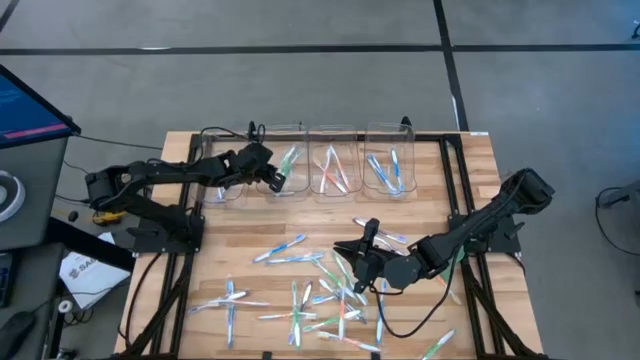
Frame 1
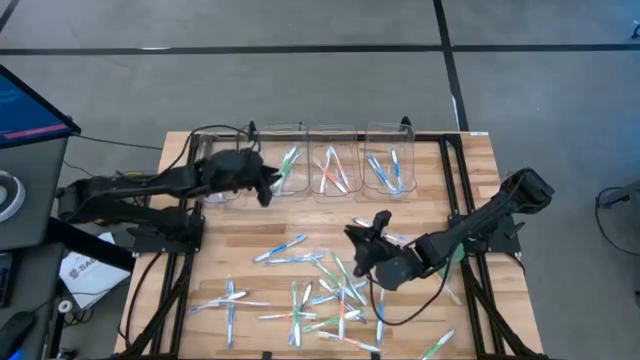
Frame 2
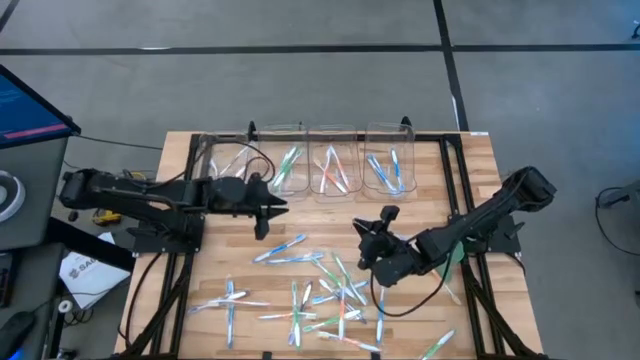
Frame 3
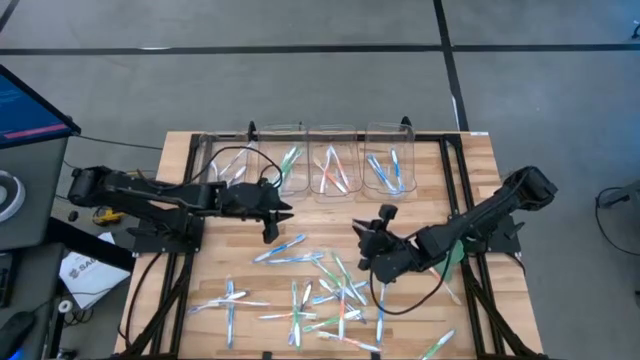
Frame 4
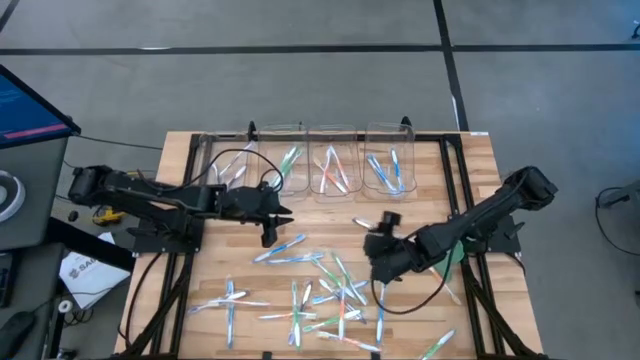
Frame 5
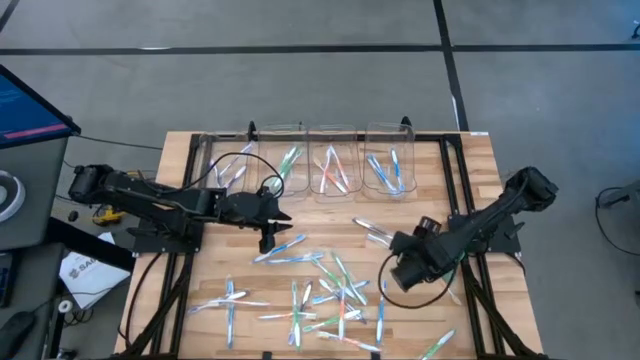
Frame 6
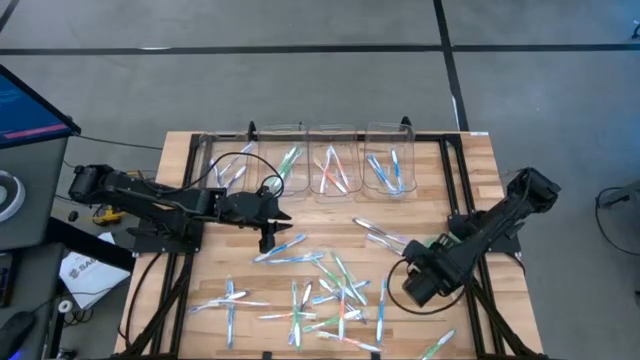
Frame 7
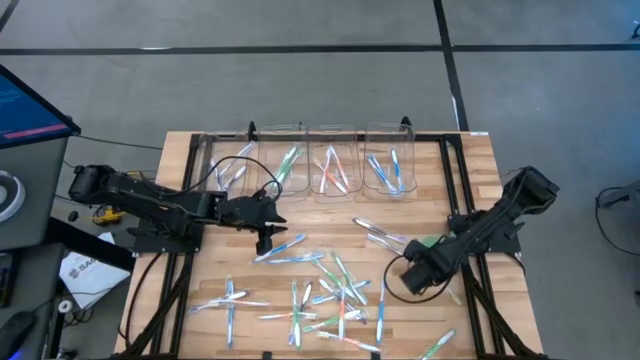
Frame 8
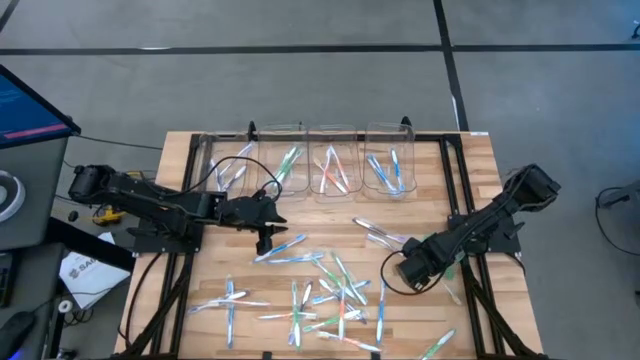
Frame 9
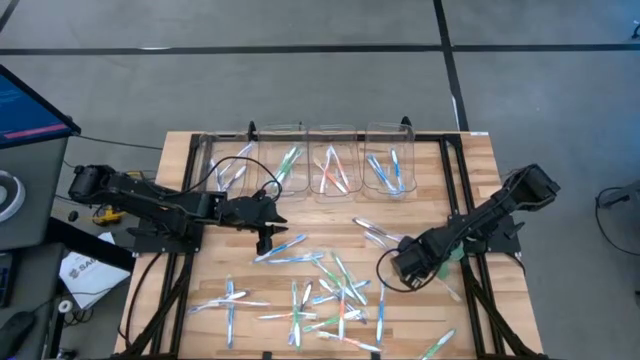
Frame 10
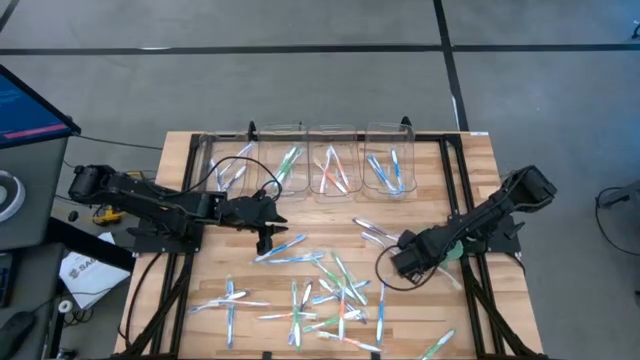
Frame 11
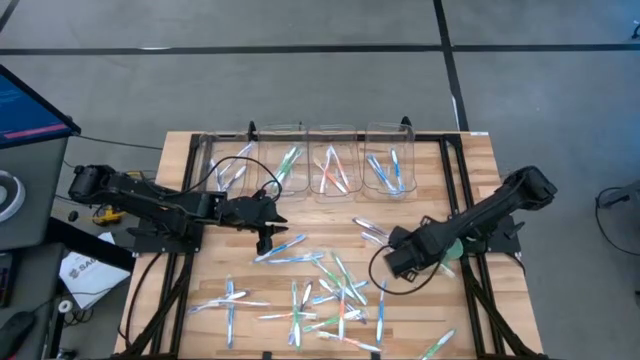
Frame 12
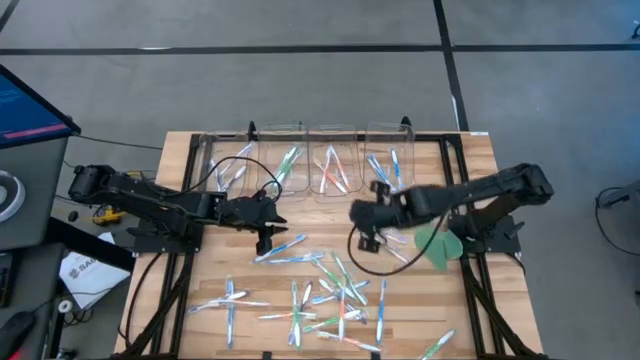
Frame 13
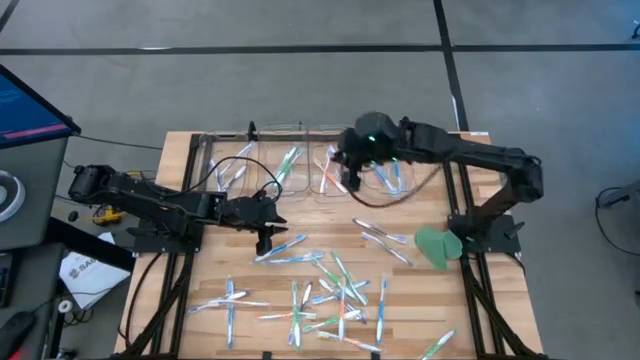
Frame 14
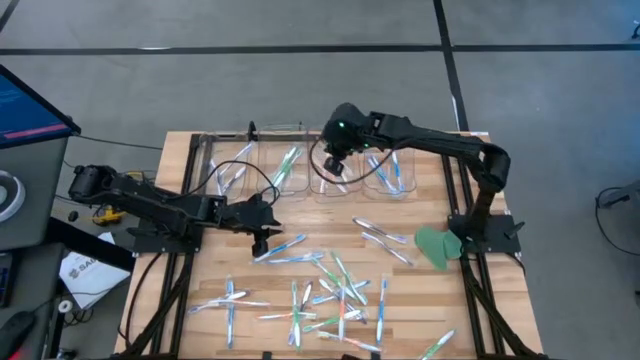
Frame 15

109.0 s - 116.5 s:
Task: Pick & Place Toothbrushes
Put the orange toothbrush into the middle right transparent bin

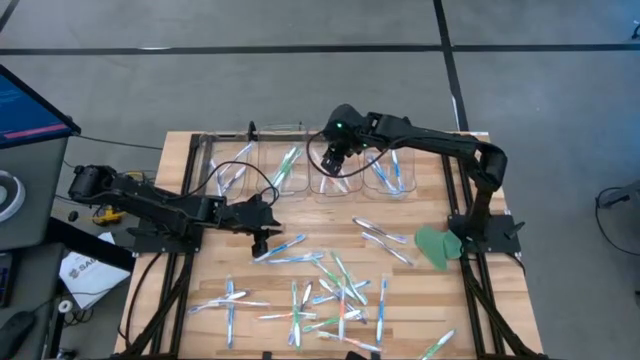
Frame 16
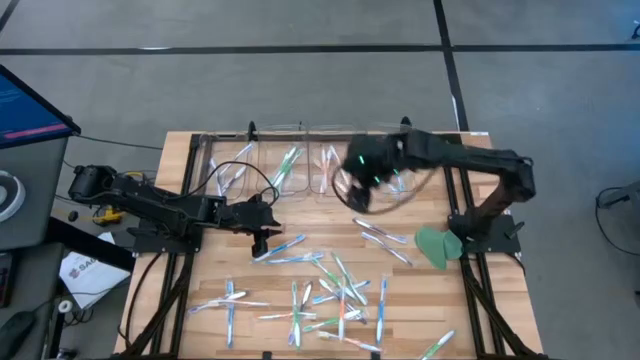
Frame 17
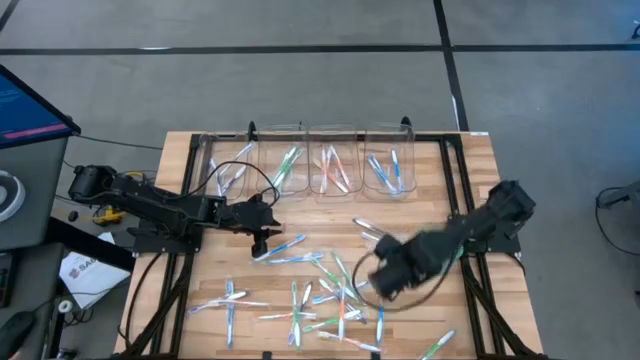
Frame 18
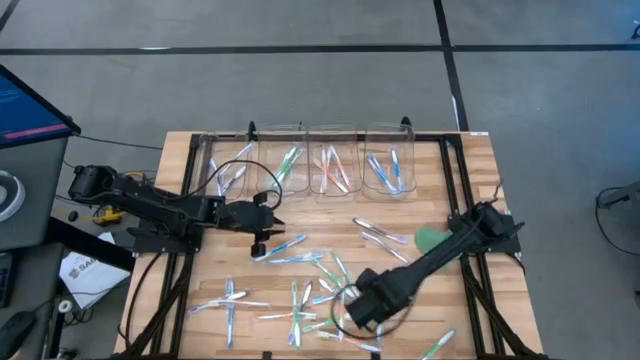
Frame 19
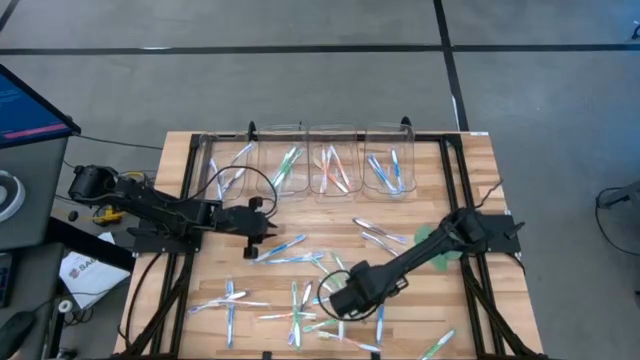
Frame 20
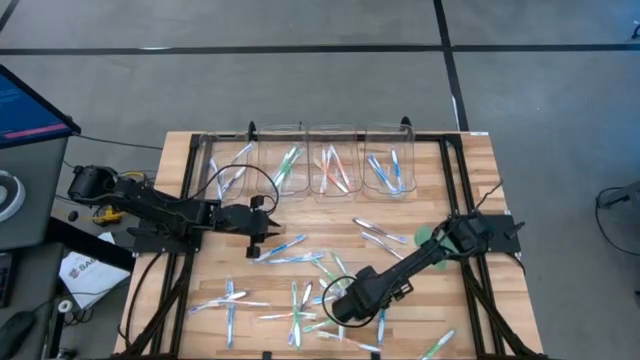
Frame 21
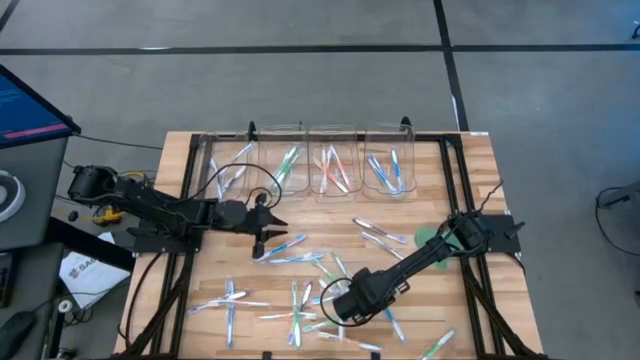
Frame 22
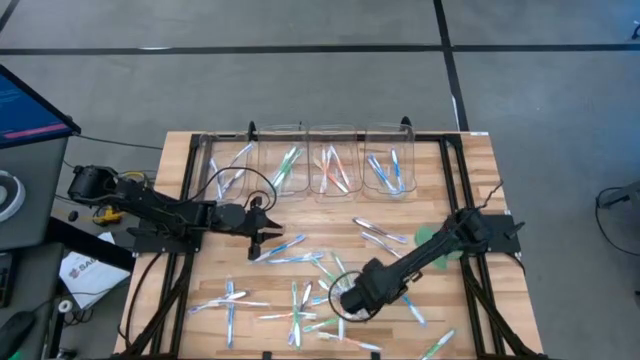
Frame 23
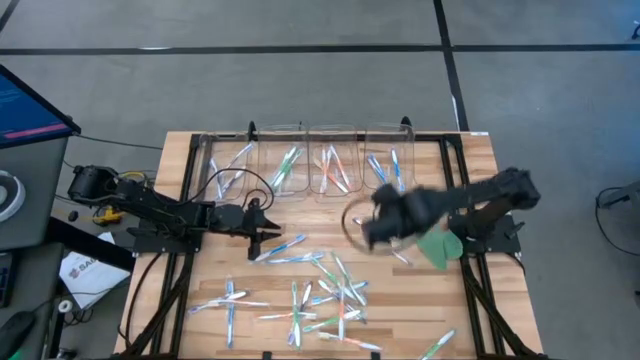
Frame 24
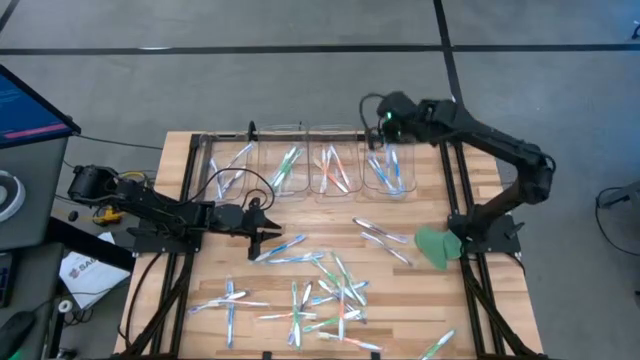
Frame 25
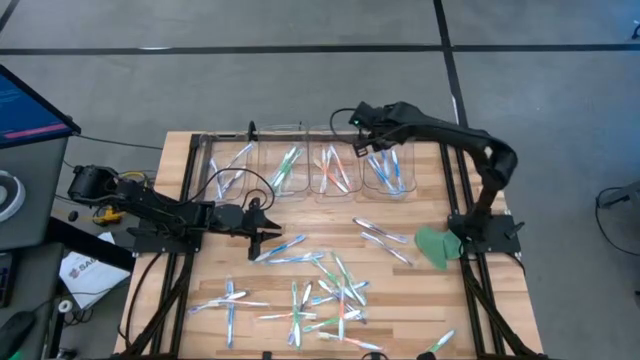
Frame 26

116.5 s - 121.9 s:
Put the blue toothbrush into the right transparent bin

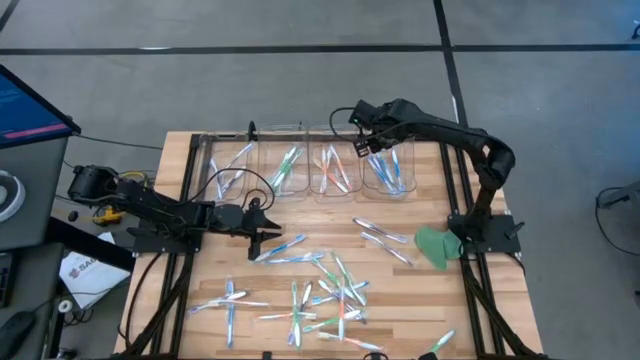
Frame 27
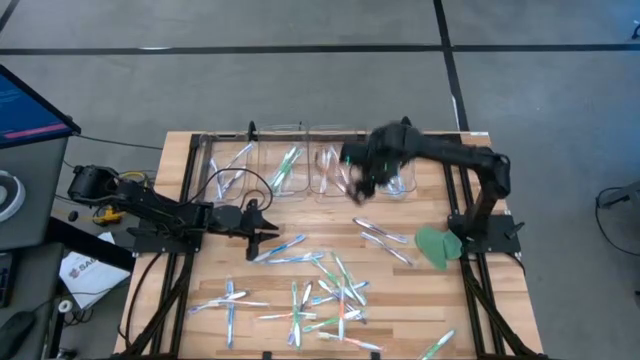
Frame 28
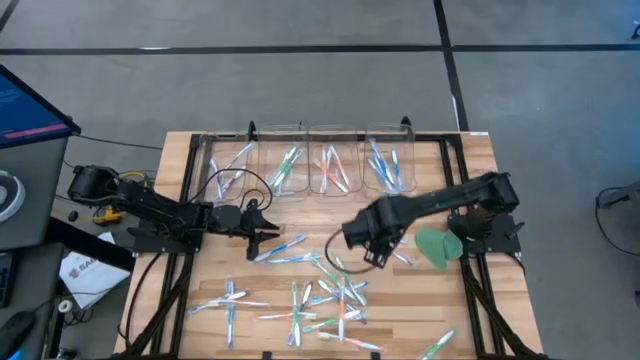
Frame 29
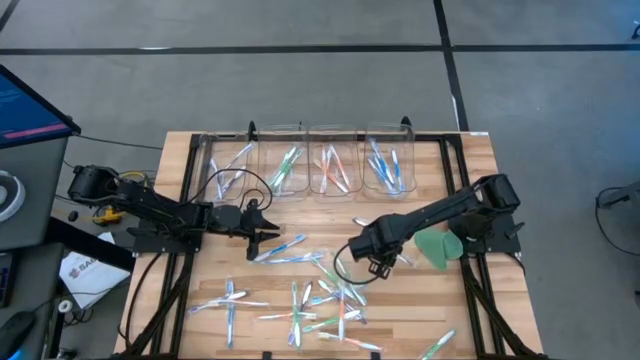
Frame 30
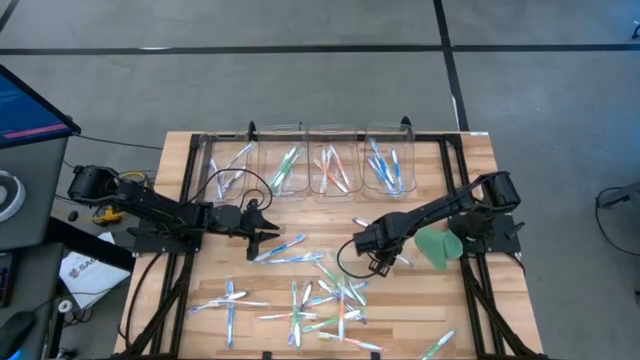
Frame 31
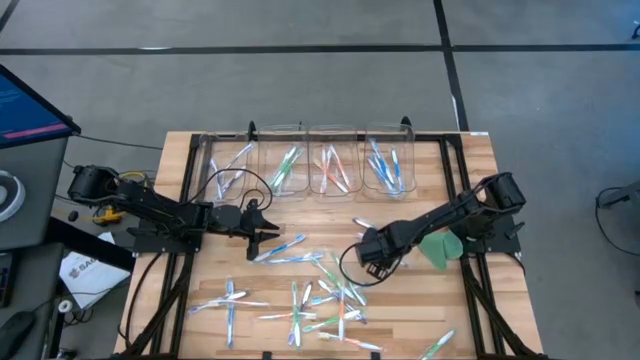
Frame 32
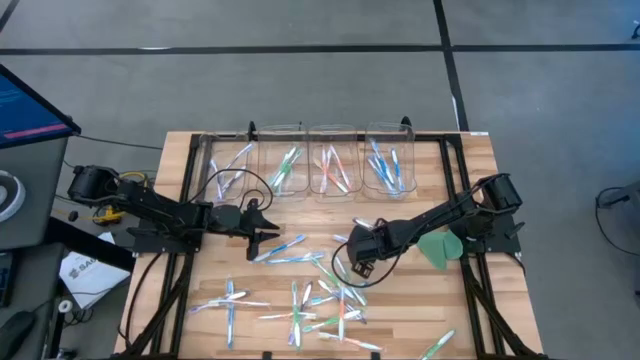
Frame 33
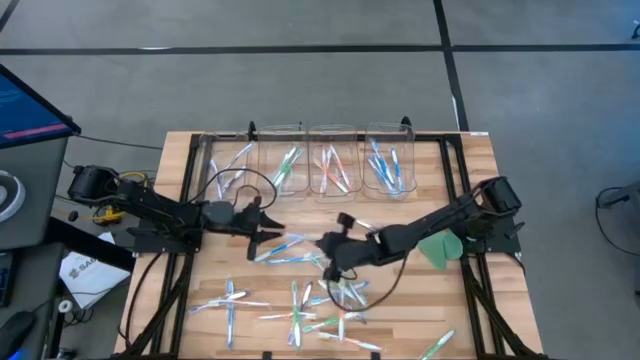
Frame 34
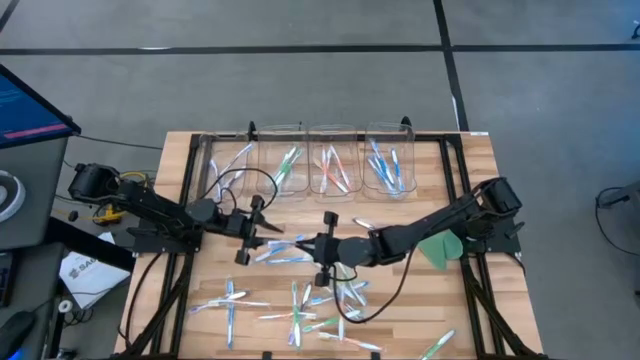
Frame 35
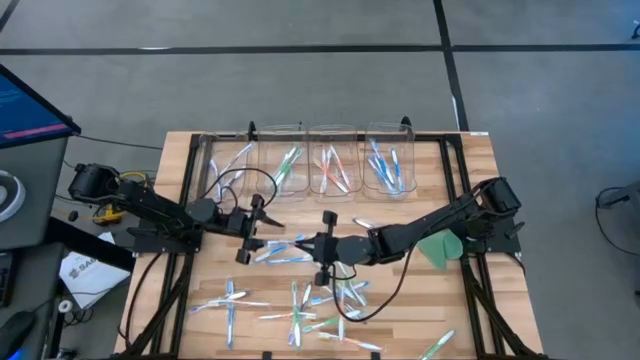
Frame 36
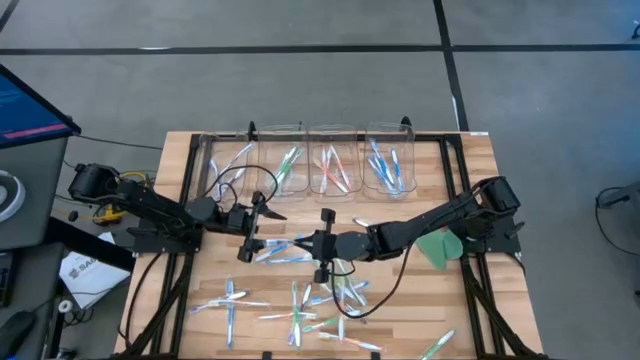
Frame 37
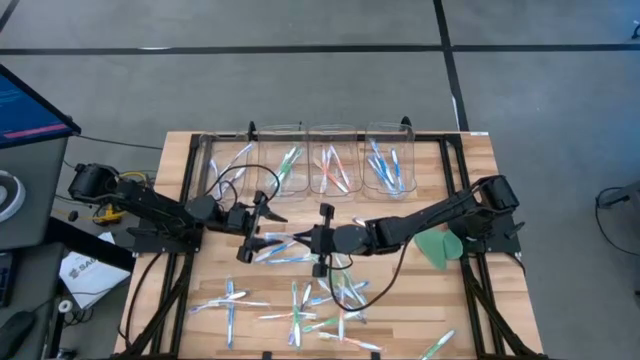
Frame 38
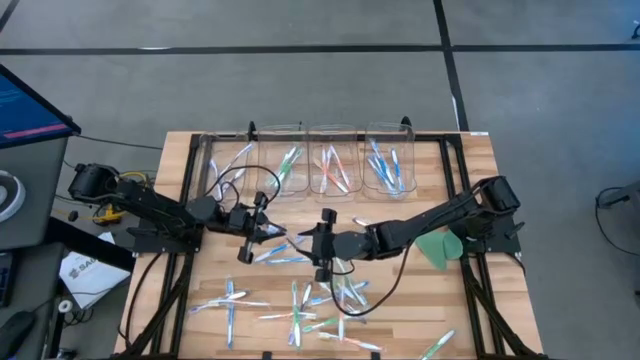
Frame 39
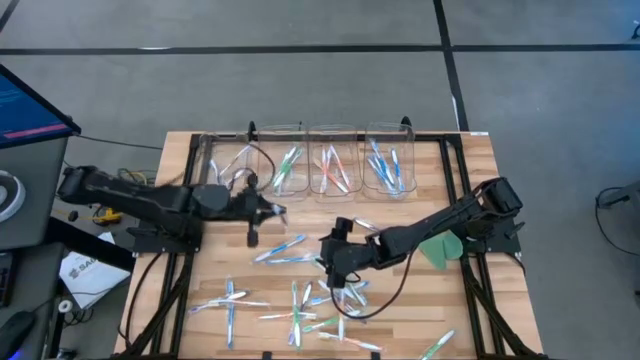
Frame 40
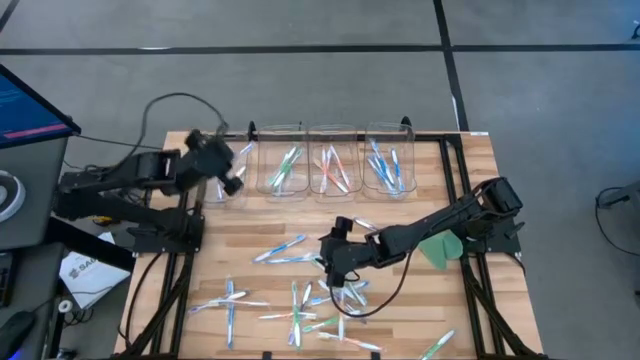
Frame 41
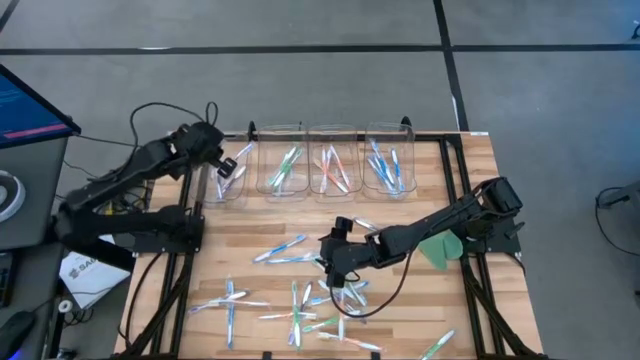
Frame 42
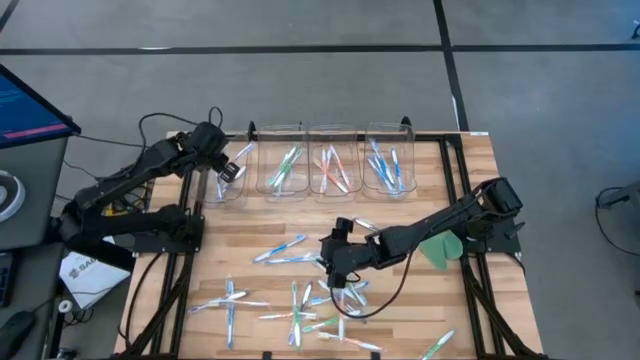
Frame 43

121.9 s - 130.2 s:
Put the violet toothbrush into the left transparent bin

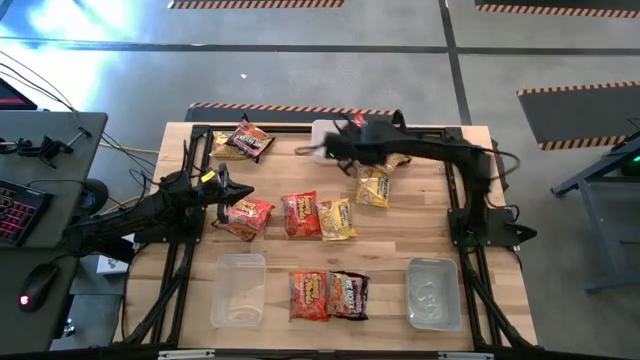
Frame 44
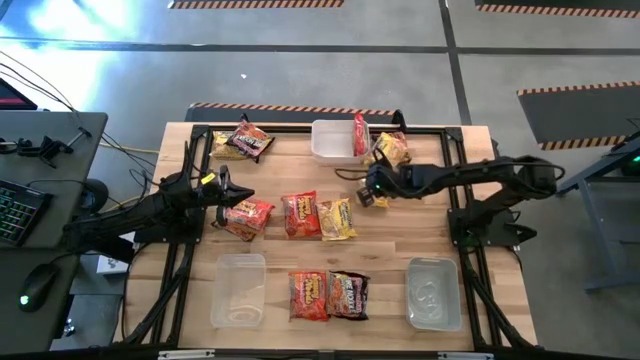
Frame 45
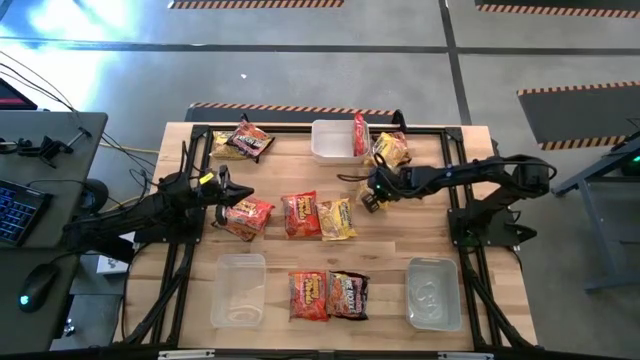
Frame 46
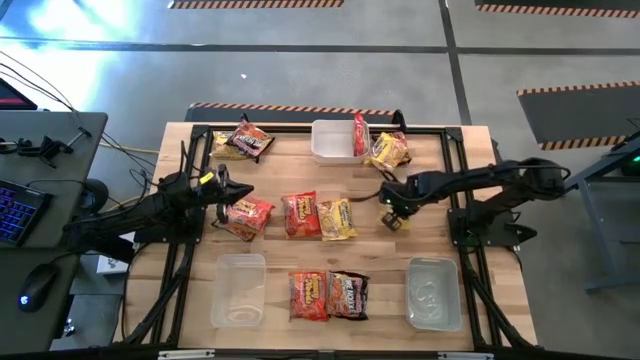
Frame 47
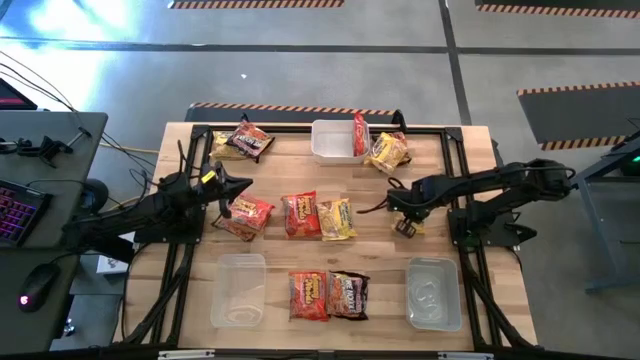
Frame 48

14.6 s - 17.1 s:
Task: Sort Maruchan noodles
Move the yellow noodle pack to the middle right of the table
